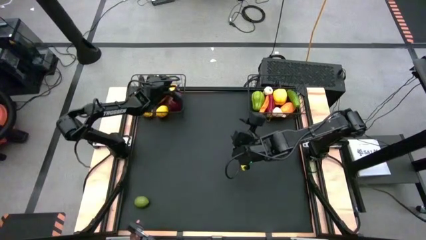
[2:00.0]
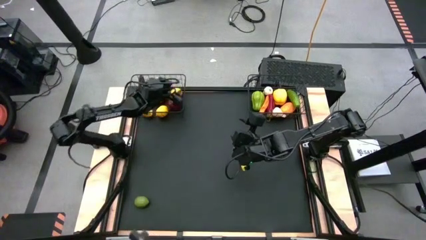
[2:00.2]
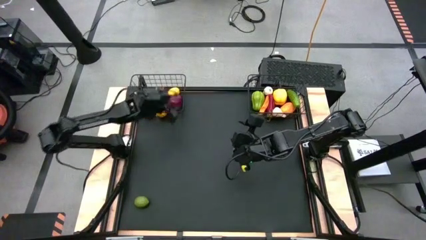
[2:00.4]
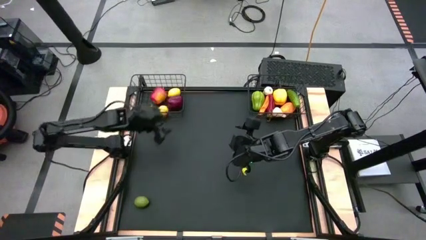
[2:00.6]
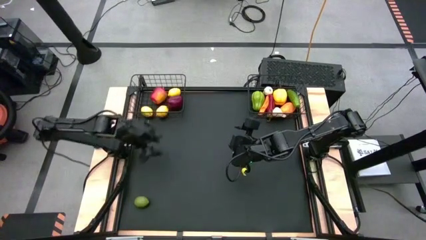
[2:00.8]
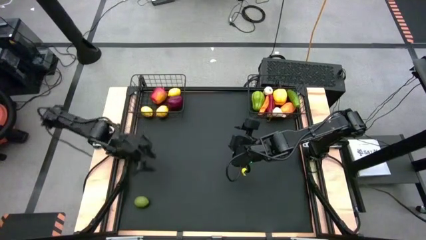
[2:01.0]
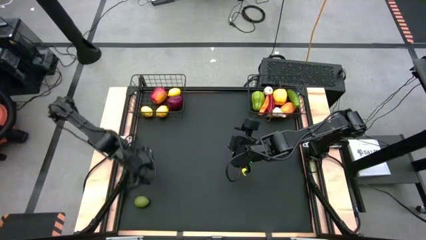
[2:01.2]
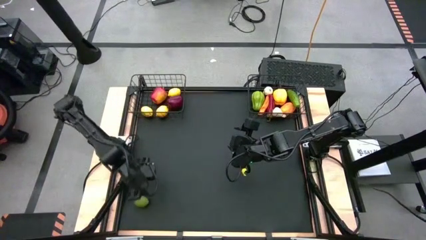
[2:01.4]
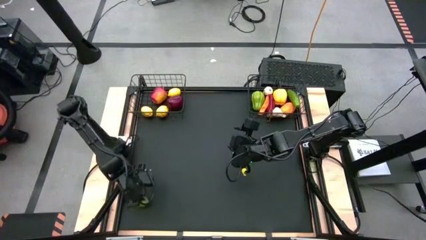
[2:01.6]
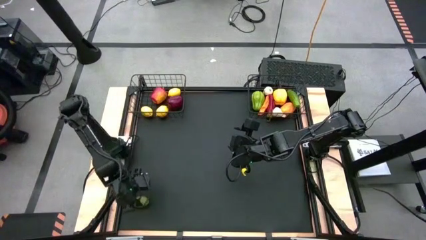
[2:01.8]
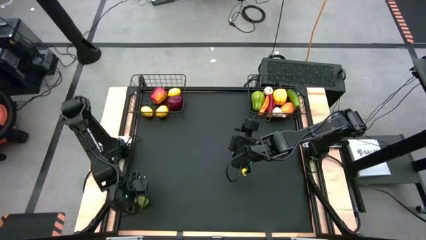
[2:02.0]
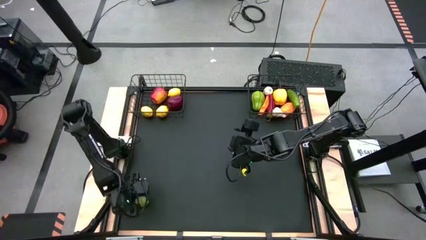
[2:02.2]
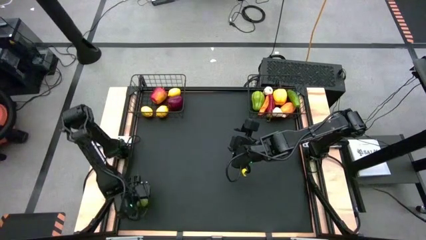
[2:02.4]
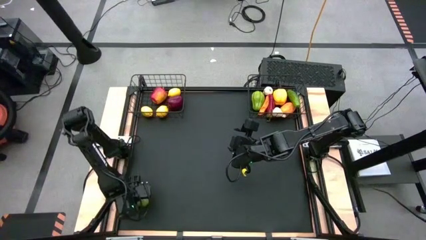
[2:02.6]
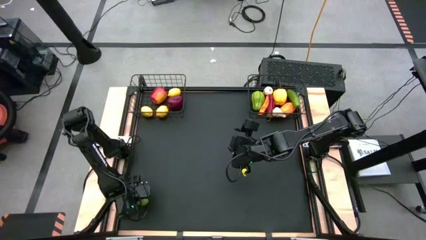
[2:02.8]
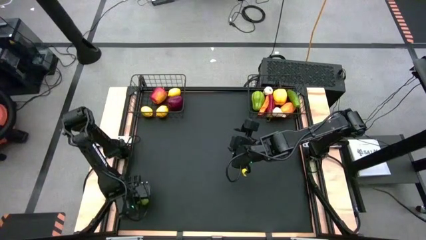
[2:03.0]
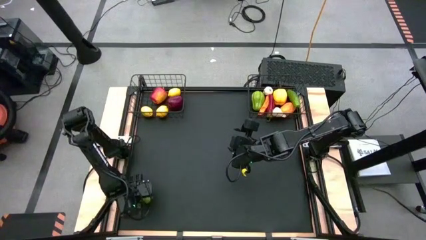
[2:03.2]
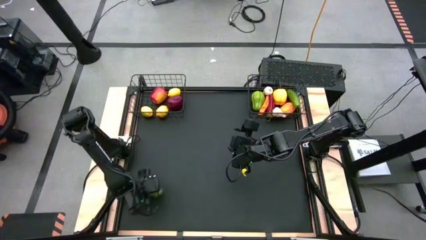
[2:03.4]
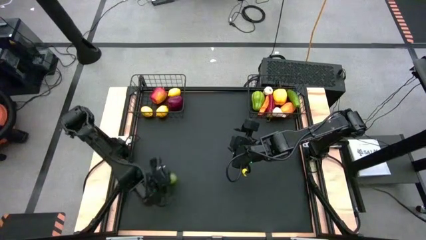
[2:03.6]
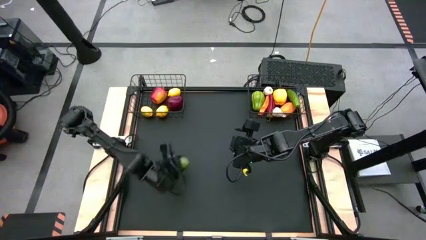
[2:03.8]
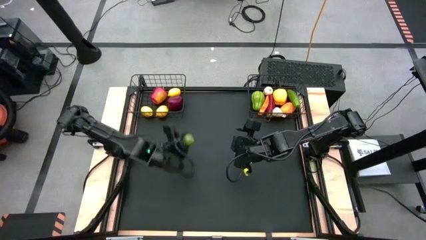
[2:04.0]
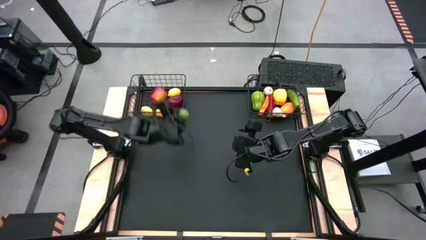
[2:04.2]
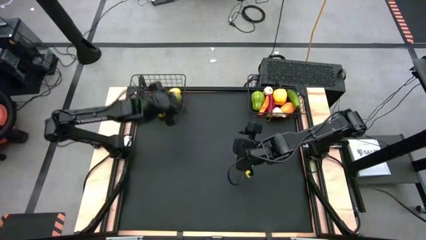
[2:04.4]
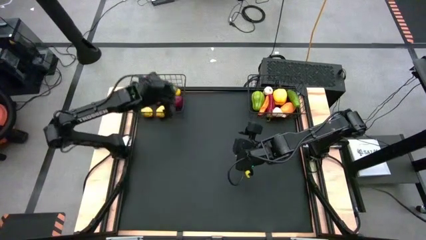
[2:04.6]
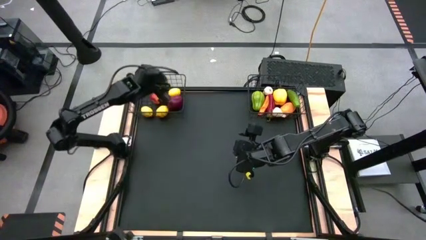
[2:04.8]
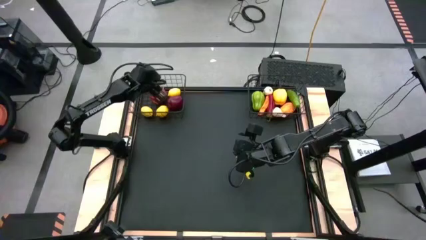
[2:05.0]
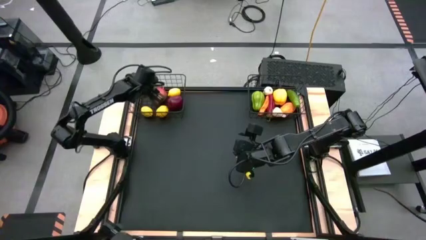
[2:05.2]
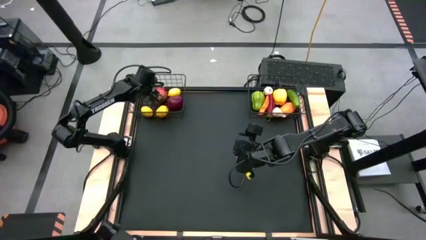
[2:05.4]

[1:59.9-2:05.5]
Task: Sort produce into baskets
Put the green lime into the left black wire basket

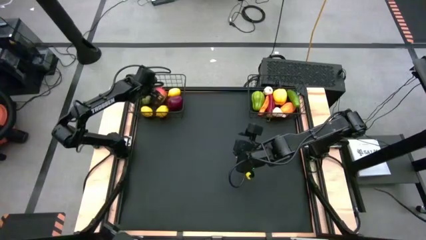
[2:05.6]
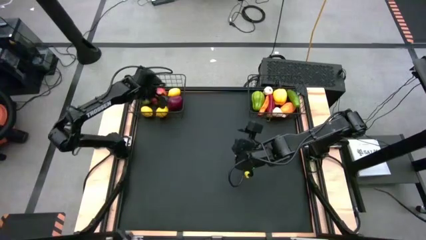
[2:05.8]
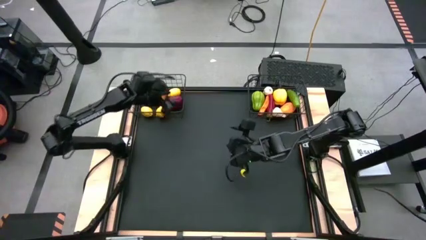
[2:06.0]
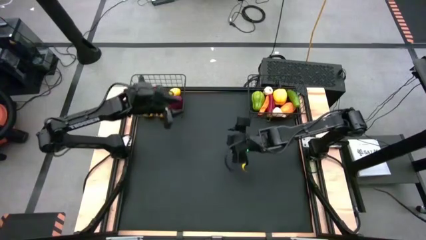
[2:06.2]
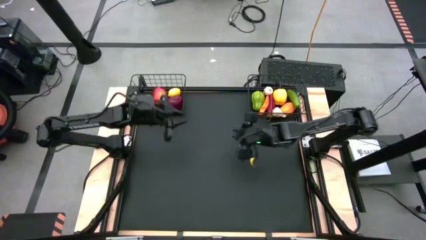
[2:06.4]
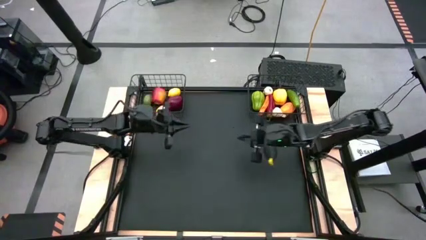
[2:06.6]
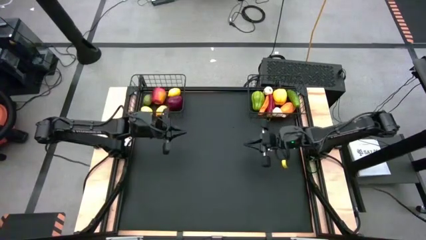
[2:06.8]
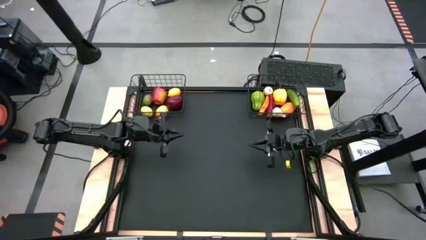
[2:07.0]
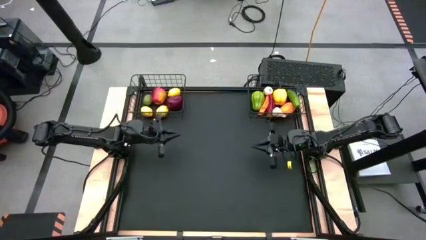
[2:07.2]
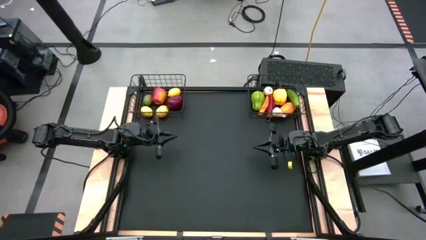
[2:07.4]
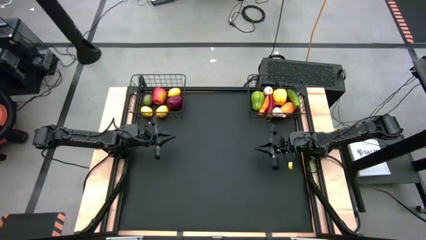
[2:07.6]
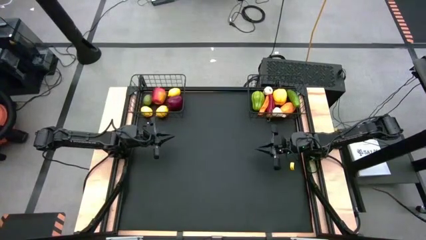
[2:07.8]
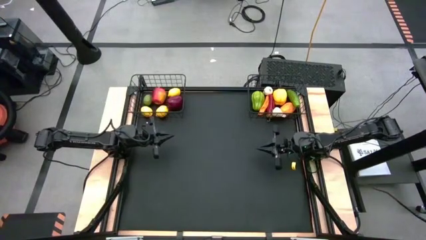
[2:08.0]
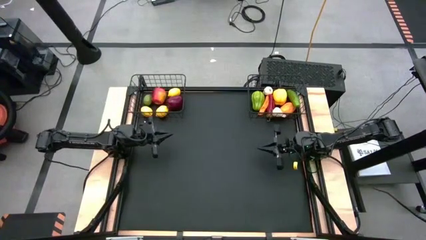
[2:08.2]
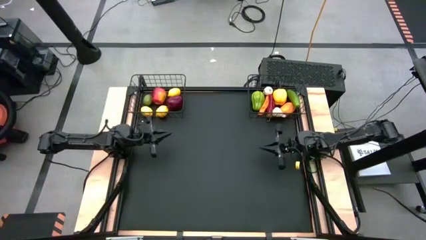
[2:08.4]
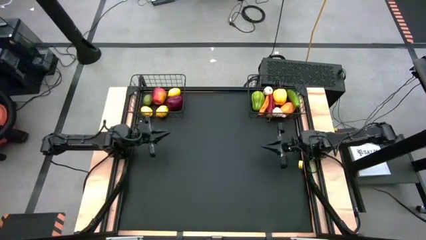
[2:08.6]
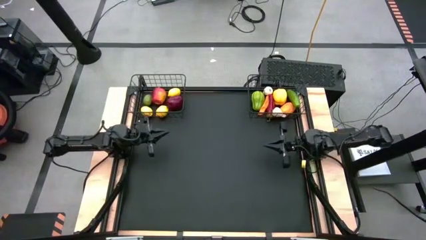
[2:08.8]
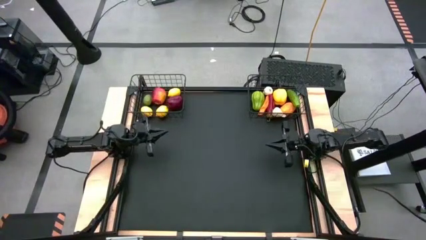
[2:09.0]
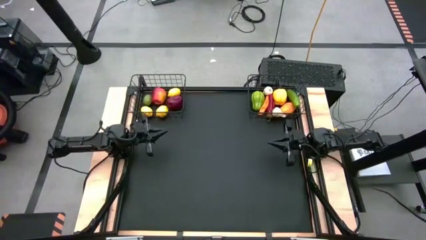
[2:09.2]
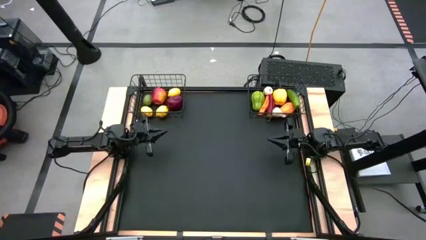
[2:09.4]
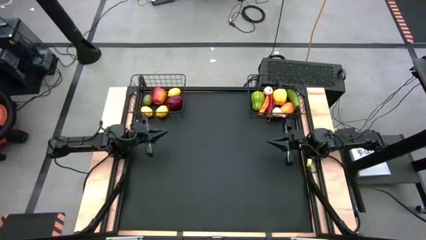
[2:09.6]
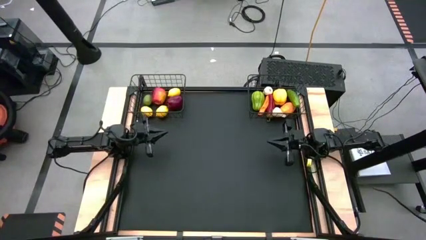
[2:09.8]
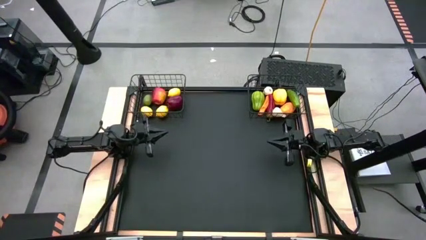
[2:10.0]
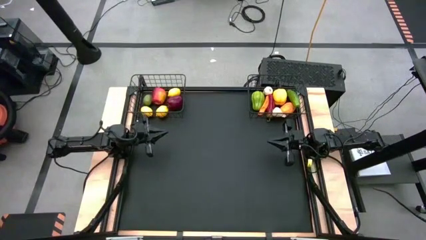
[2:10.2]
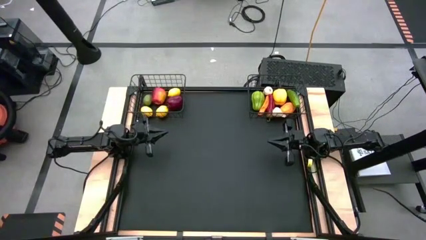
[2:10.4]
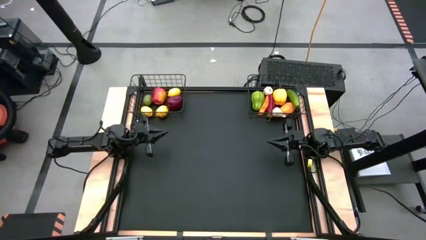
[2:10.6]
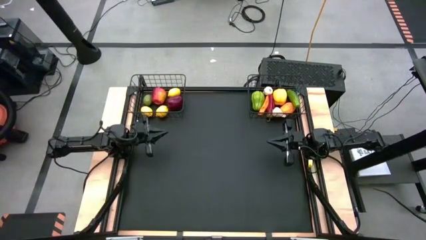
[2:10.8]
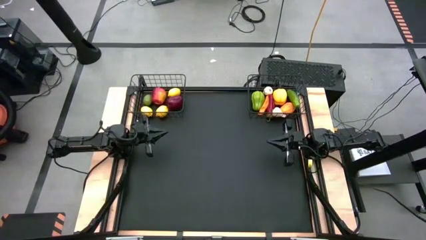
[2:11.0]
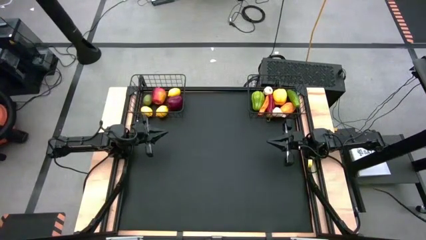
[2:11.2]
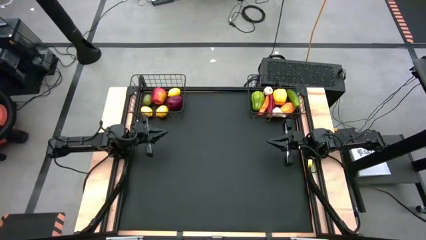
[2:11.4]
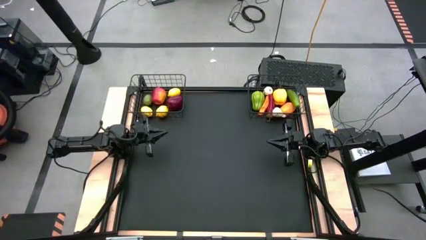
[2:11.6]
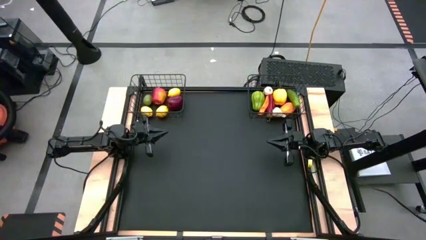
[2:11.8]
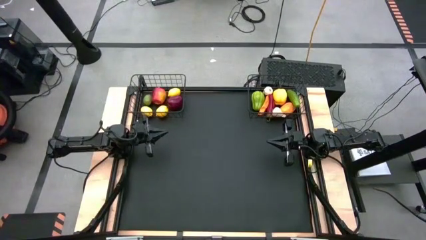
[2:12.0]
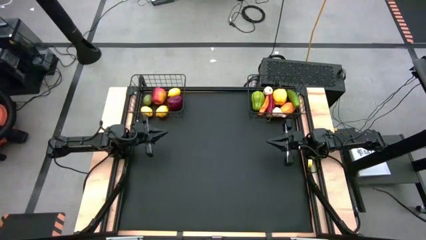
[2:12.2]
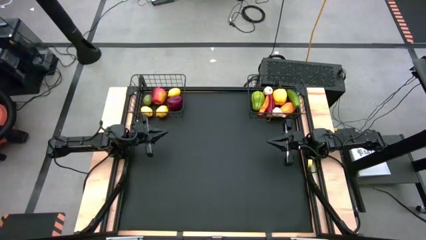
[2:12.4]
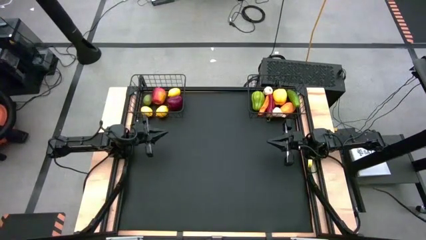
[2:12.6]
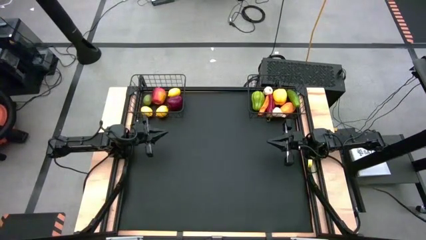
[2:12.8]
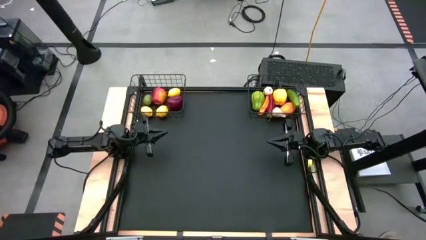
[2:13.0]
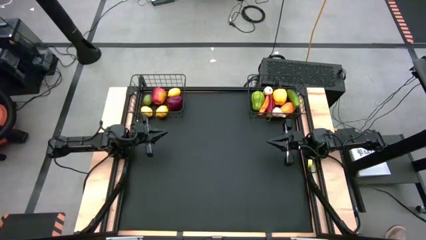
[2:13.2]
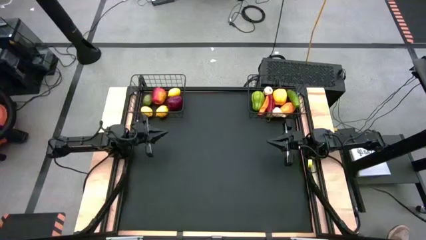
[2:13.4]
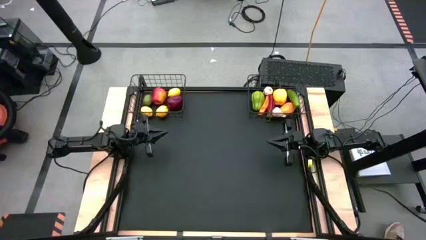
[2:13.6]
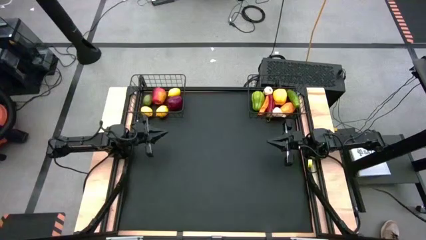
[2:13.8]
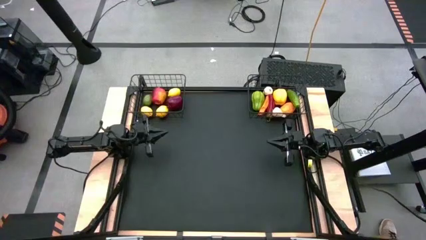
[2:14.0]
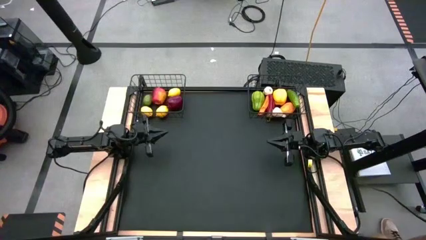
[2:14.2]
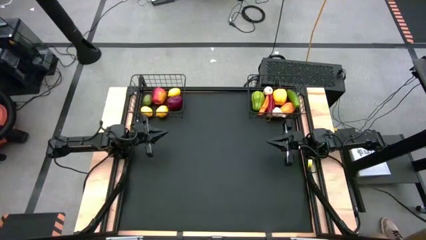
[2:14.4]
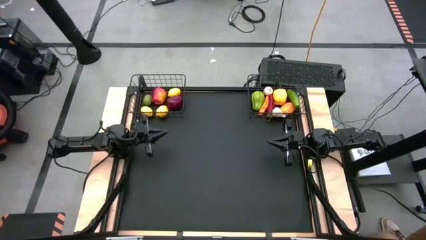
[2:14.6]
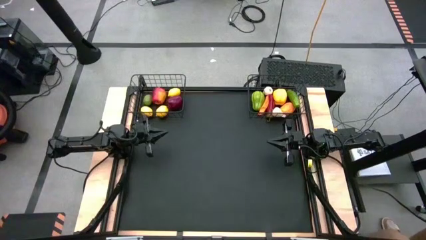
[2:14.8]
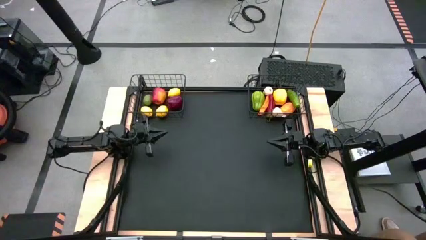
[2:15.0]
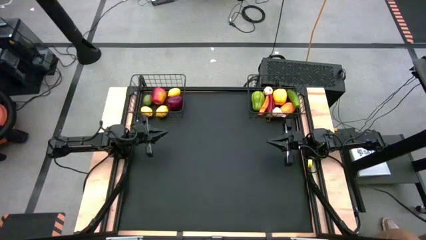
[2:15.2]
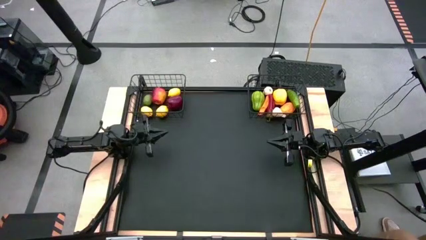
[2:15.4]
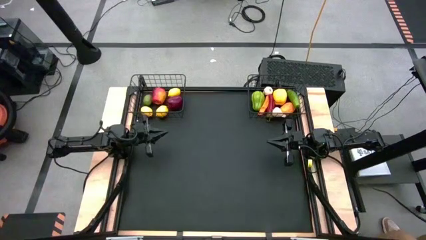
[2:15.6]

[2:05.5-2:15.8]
Return to Home Position

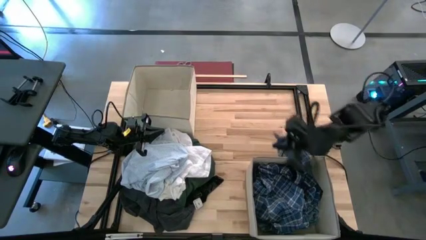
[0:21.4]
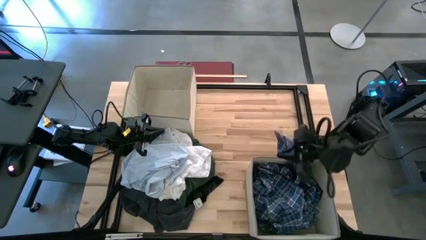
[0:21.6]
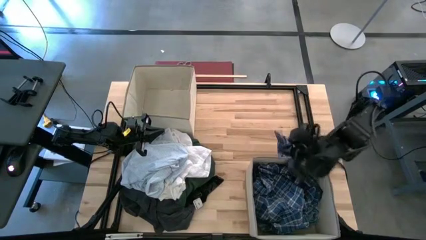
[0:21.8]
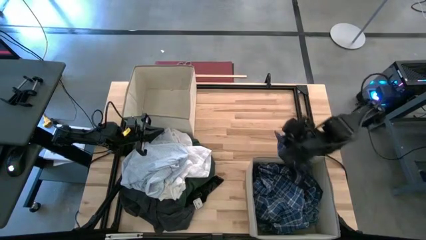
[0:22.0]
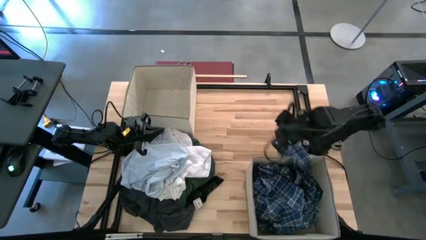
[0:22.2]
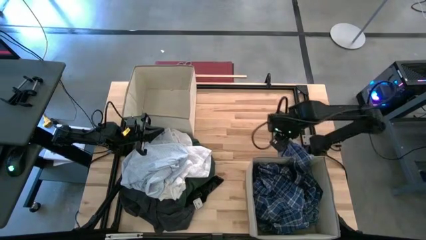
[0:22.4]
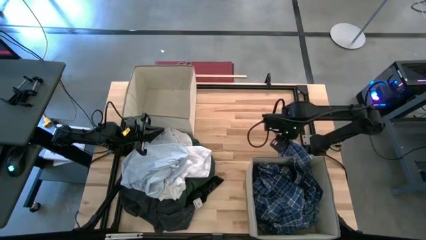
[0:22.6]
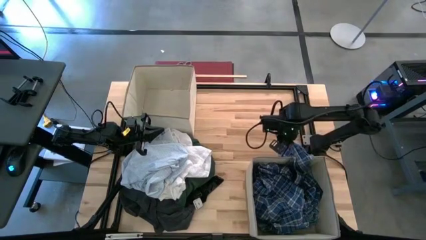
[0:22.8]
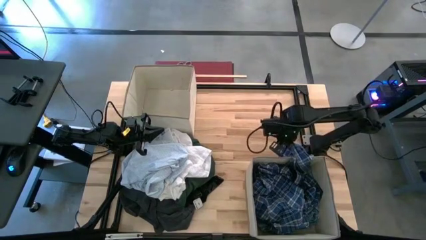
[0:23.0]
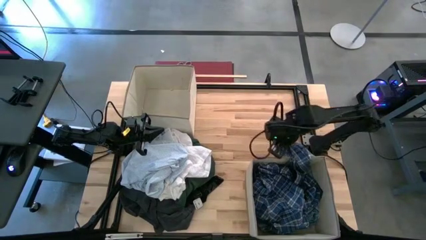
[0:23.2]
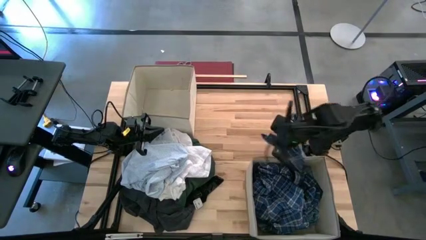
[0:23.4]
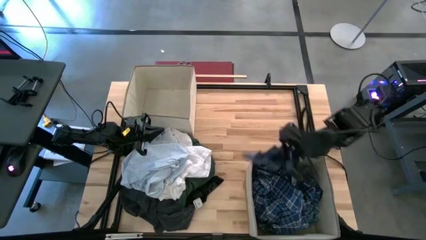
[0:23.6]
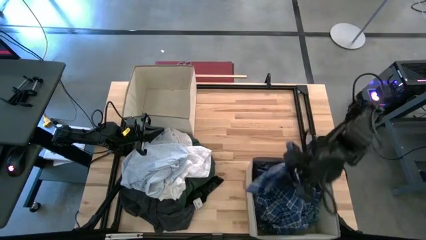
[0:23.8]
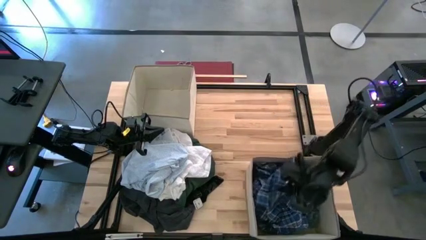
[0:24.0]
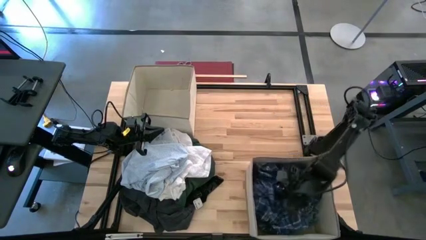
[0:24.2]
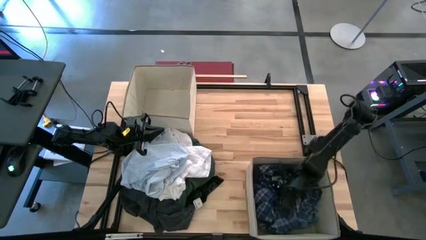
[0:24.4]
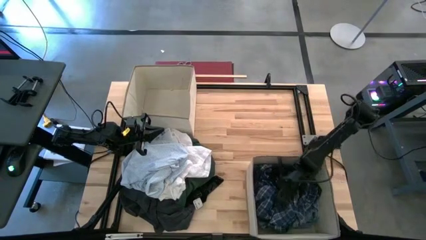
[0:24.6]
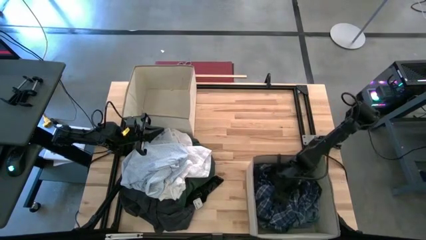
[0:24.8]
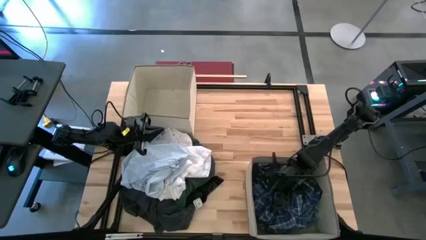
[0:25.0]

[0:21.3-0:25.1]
Task: Sort clothes
Put the blue polo shirt into the bottom laundry bin
